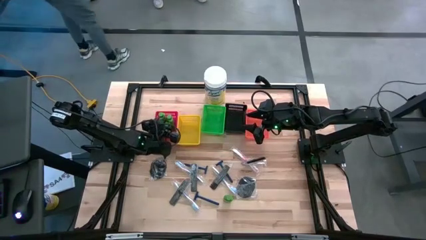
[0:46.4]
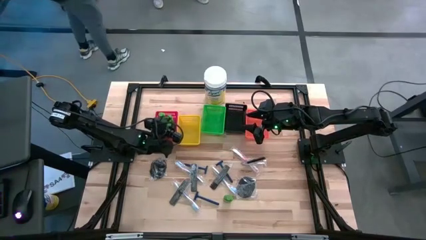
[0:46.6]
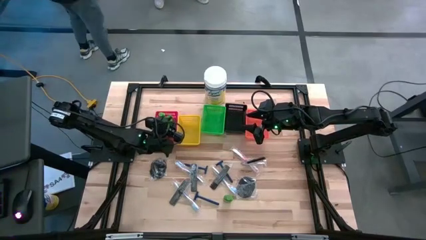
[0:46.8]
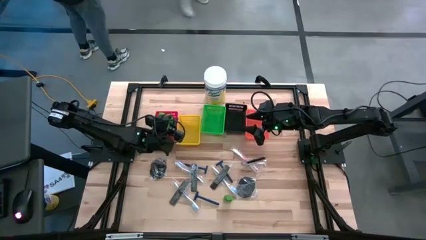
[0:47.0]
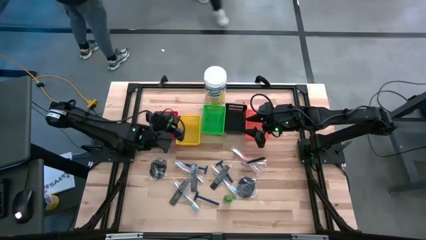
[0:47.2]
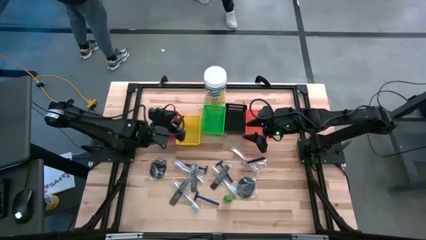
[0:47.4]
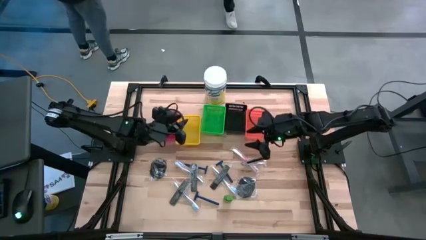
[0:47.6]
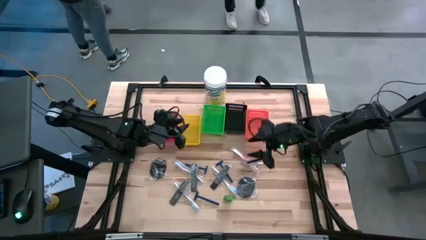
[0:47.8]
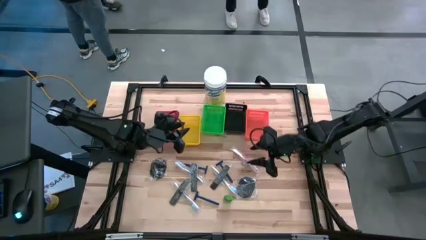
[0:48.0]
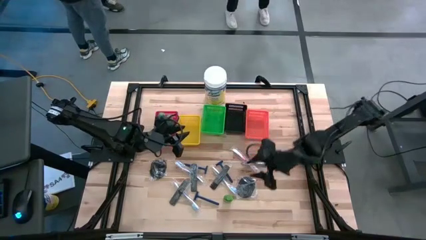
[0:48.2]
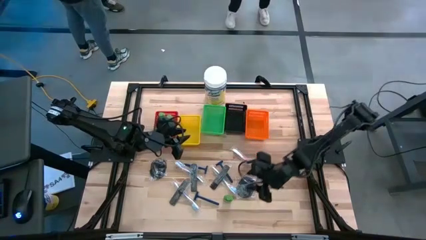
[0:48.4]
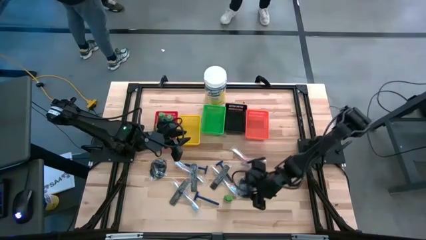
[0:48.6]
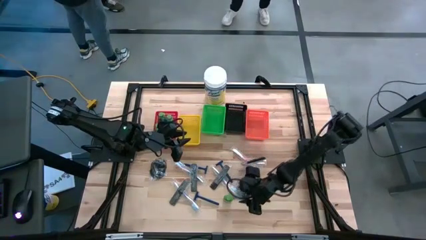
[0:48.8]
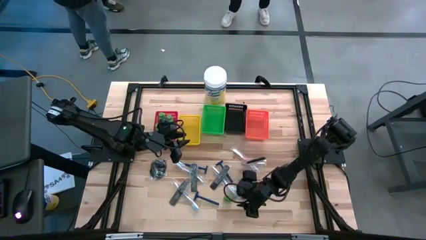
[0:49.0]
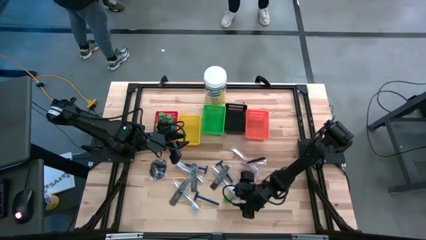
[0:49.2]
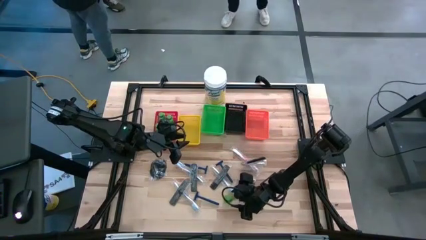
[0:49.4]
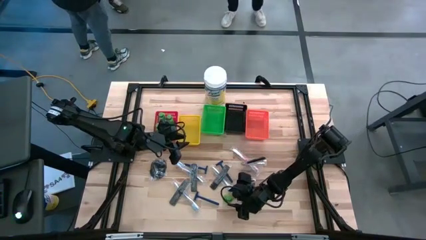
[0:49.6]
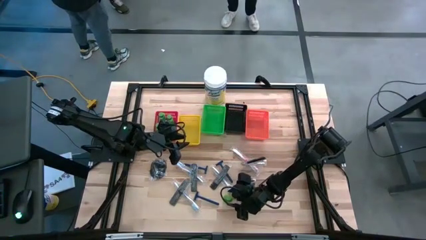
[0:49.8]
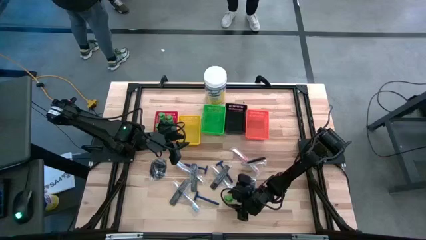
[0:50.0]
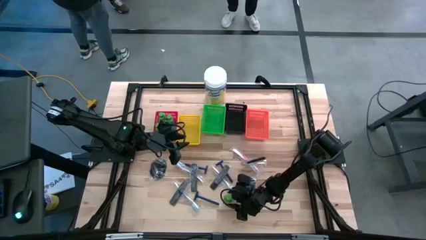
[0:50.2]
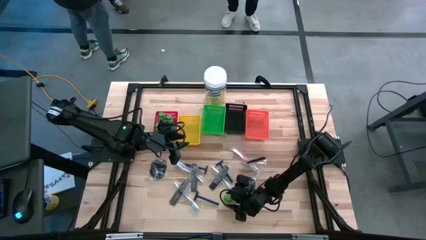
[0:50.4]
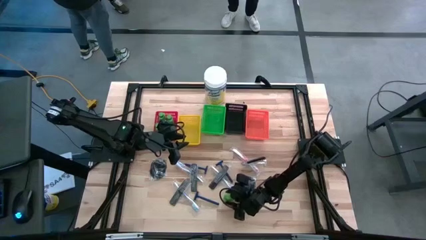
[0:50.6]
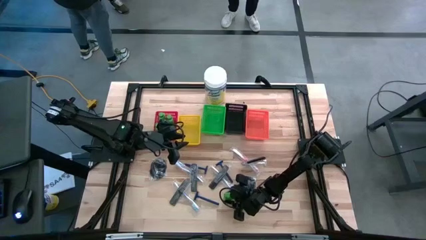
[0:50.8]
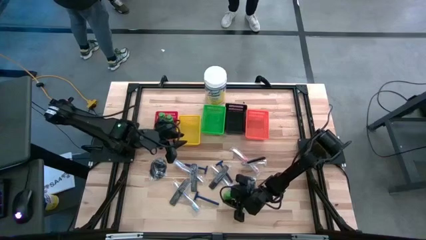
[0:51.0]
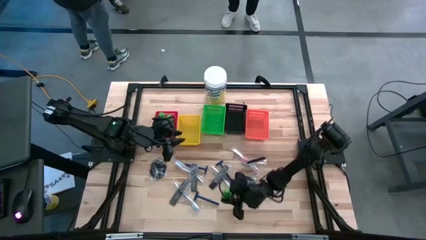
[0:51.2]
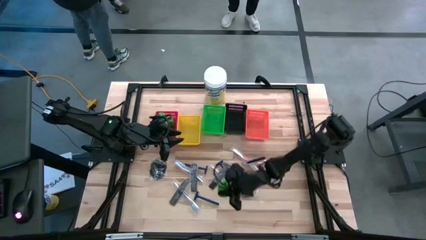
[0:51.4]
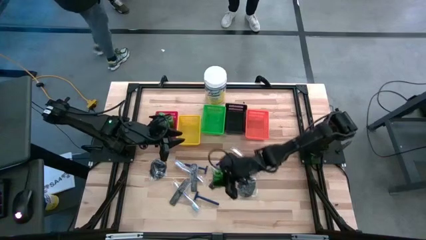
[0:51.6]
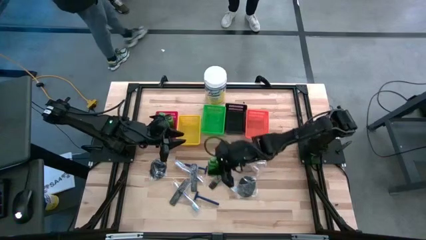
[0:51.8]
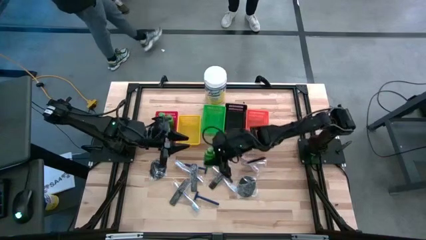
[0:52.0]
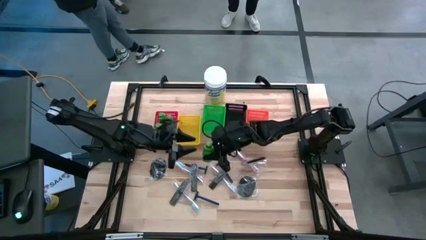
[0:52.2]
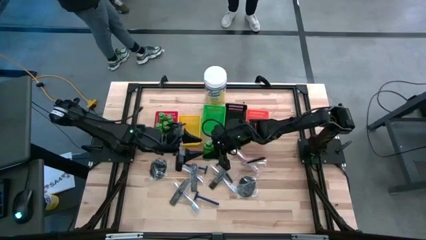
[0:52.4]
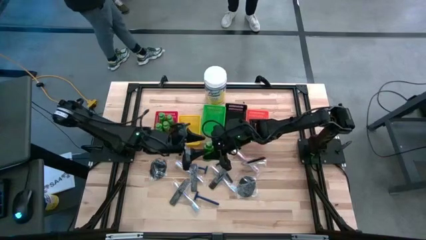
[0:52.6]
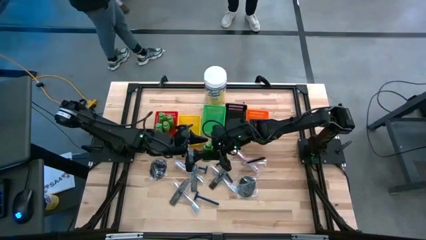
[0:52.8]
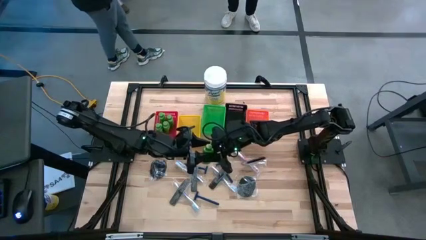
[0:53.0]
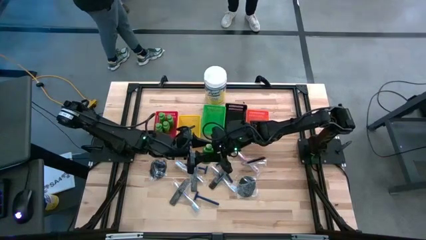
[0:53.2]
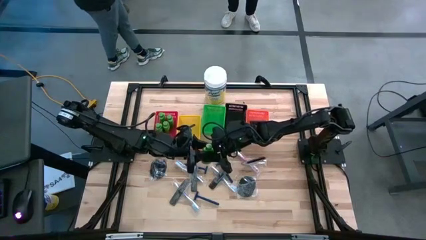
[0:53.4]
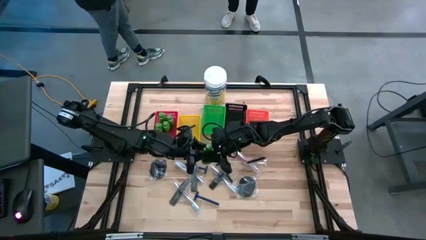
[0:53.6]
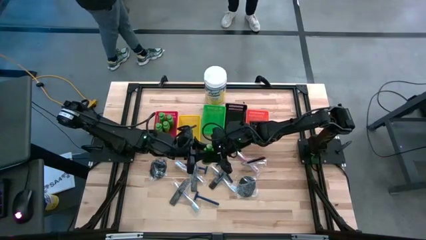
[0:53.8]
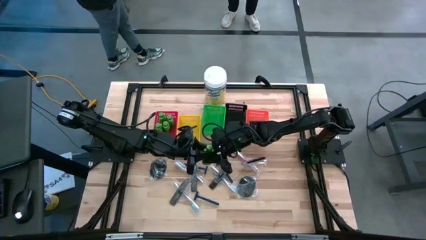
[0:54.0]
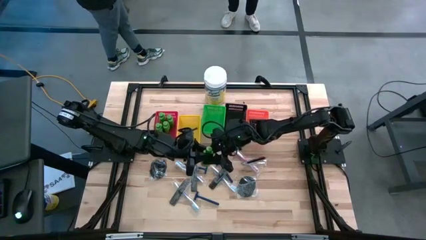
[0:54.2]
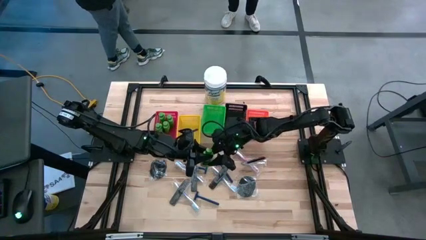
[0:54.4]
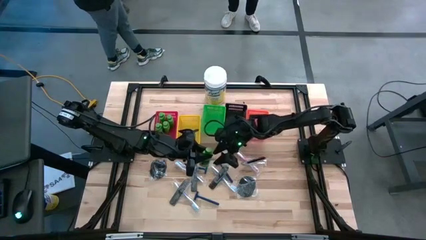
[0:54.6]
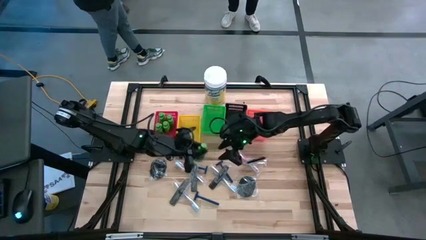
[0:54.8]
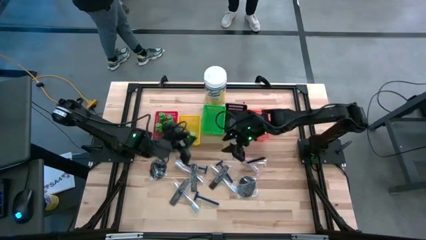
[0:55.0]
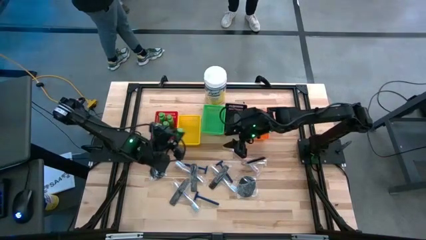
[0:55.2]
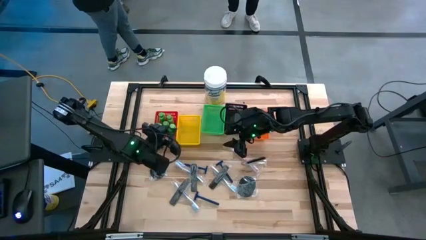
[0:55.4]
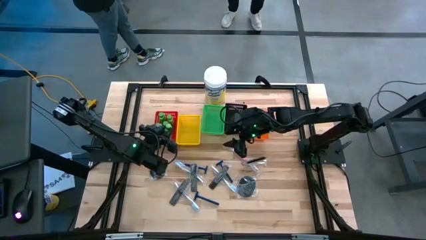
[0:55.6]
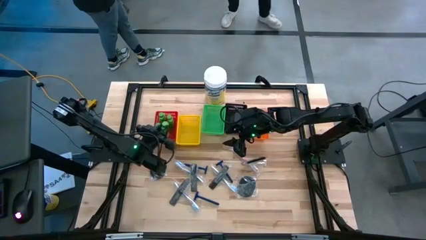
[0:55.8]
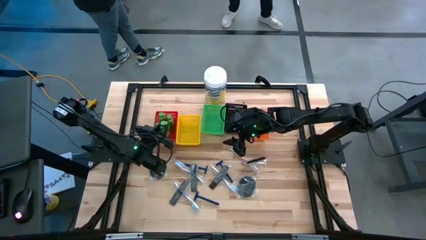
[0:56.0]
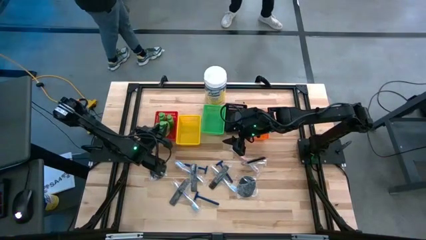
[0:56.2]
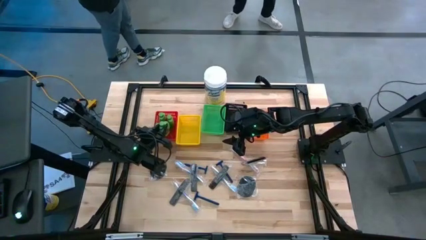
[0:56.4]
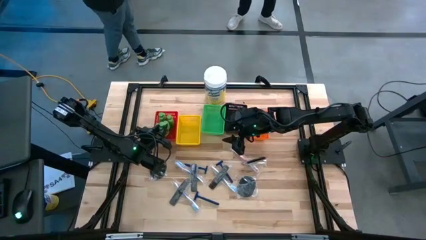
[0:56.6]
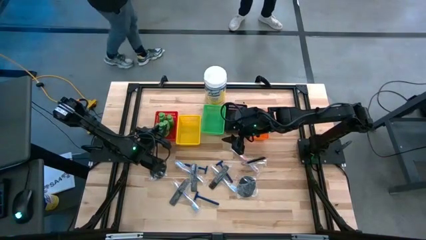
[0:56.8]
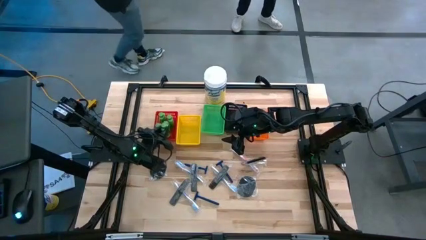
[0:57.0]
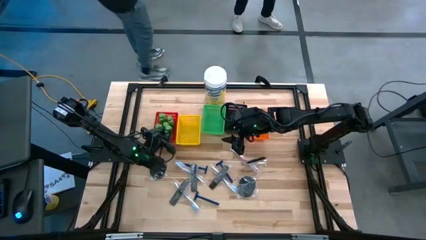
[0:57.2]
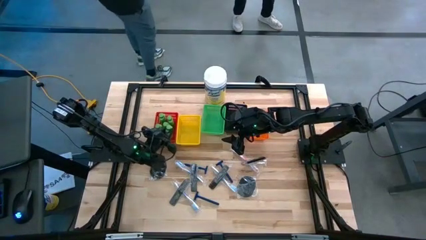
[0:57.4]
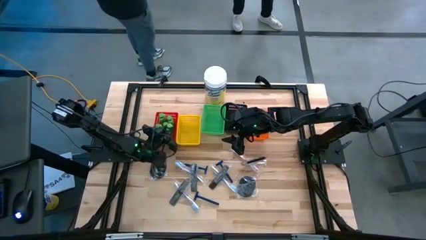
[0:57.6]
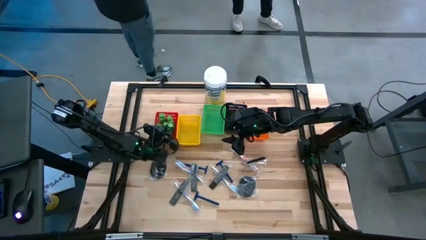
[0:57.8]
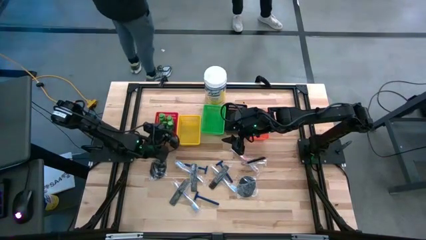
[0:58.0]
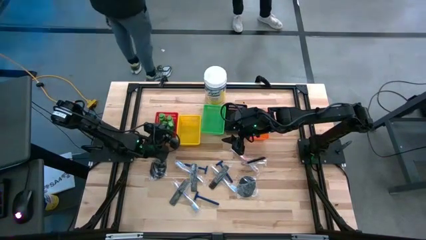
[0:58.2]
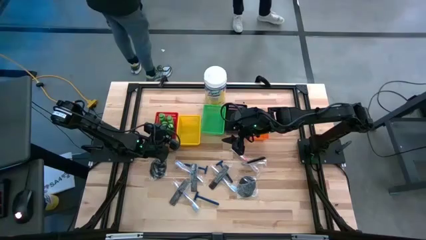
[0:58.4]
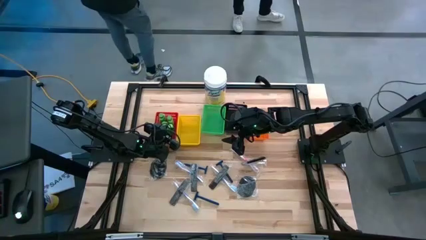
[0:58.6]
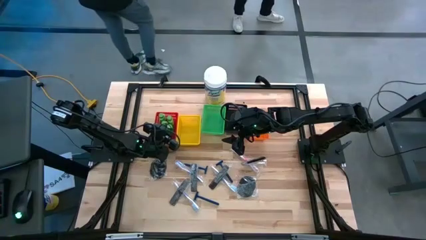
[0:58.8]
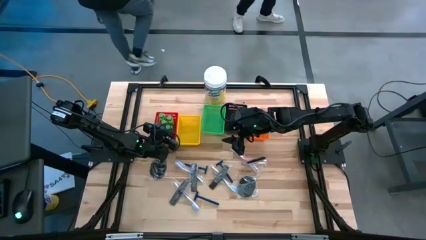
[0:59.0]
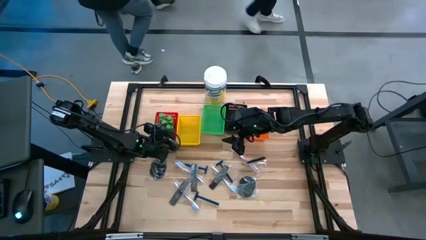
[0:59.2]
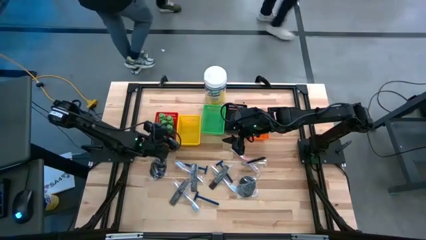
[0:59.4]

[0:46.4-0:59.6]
Task: Pick & Place Travel size toiletries
Put the green shampoo bottle into the red bin

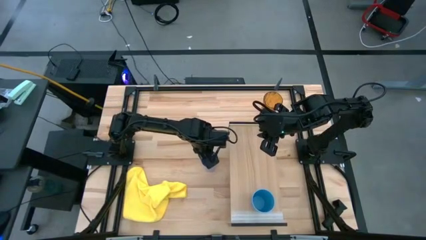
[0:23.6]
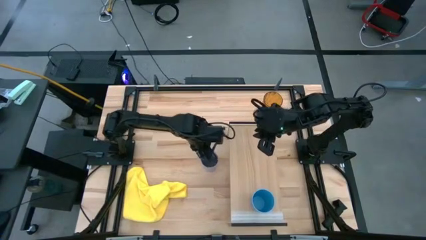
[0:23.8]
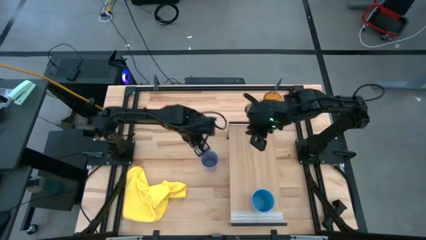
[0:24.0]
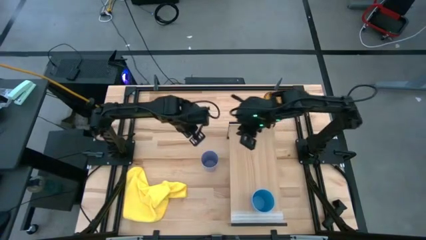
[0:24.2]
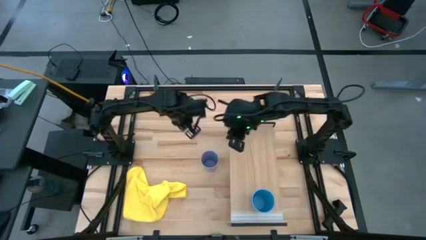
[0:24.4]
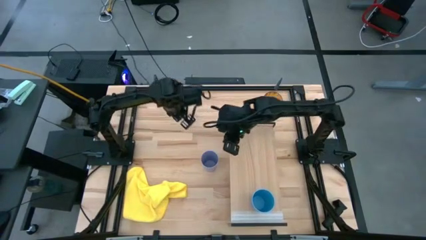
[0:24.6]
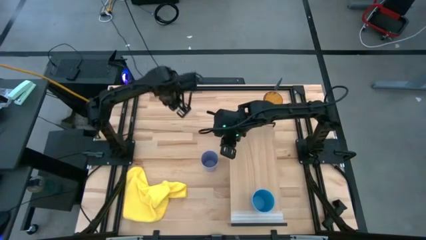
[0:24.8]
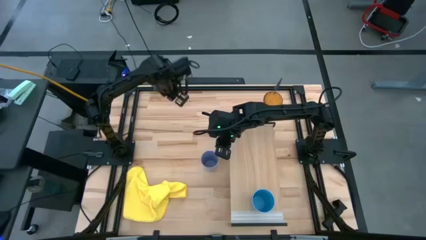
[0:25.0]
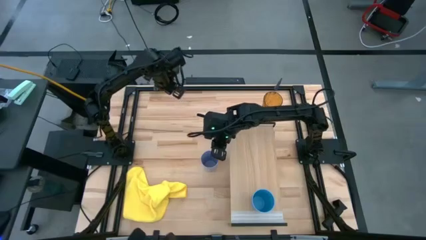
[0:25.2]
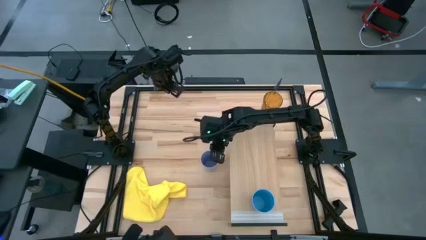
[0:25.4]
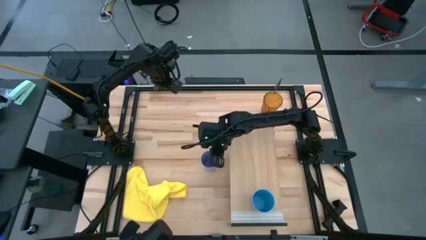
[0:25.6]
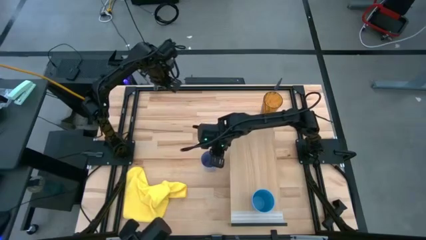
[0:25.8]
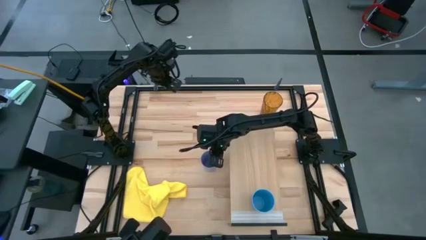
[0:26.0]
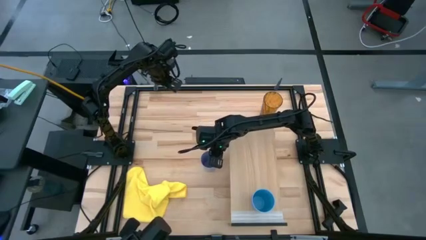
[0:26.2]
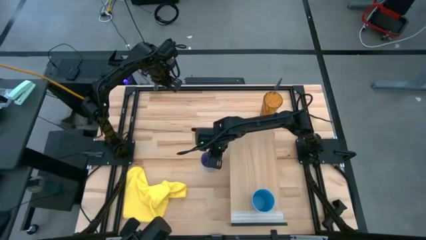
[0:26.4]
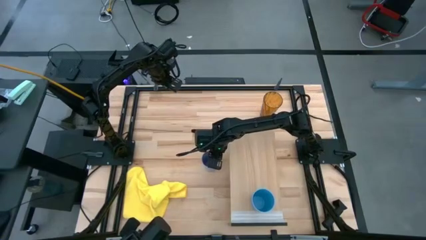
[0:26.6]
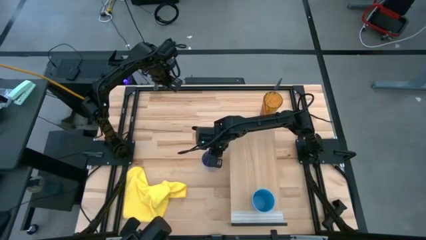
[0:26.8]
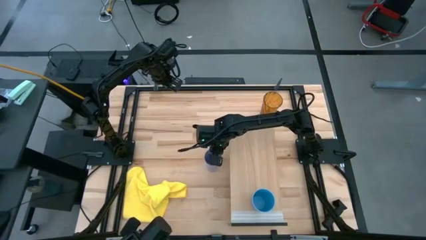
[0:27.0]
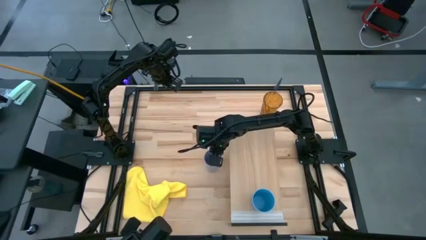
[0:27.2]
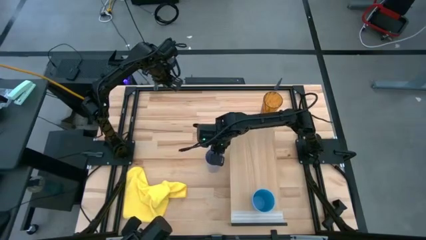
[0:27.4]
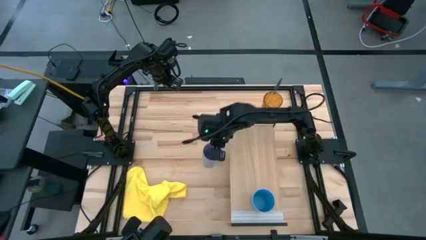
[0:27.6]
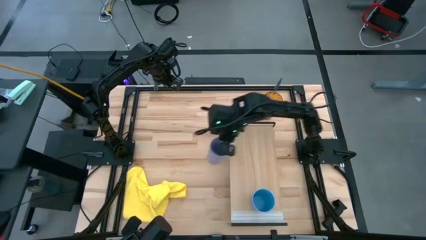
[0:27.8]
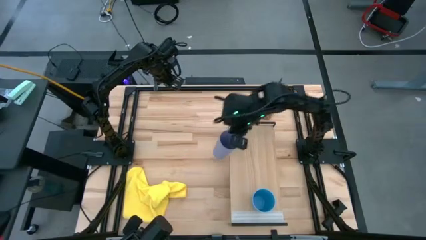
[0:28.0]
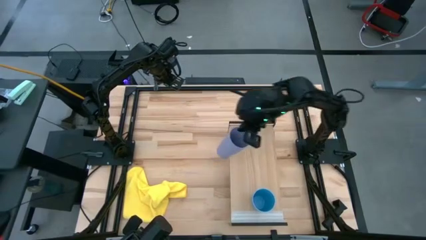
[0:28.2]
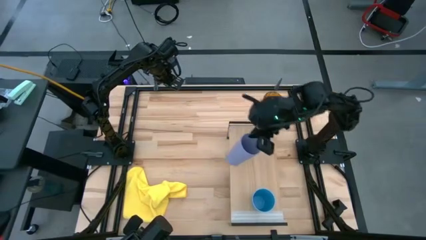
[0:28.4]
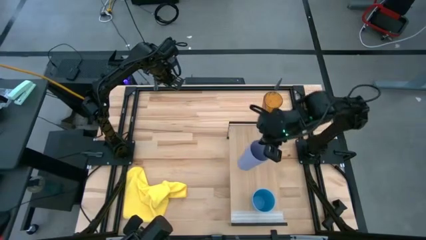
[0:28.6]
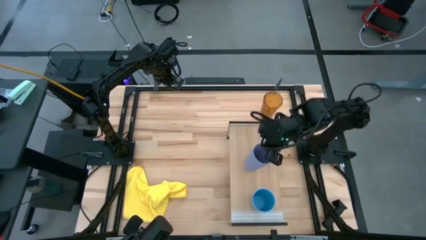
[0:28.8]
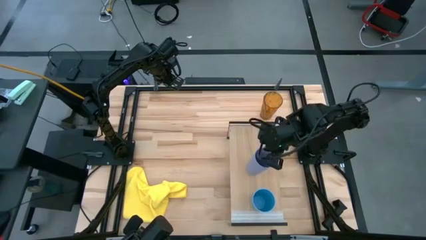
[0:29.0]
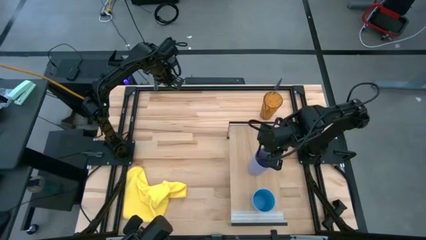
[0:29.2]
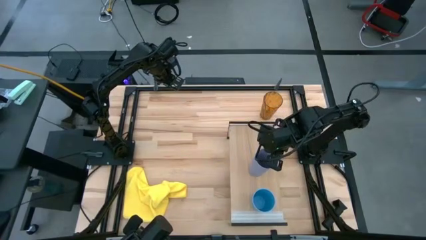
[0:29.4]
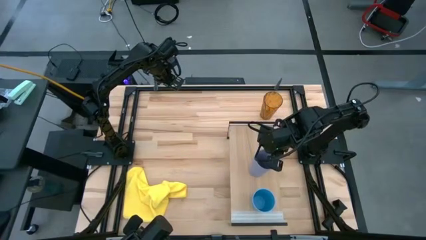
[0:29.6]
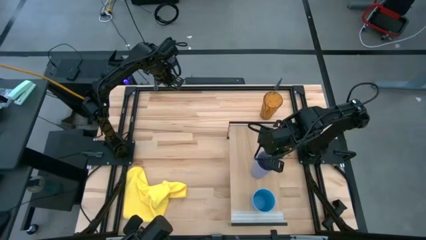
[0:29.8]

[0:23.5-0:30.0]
Task: Stack small to large cups/mugs on shelf
Put the purple cup onto the shelf
